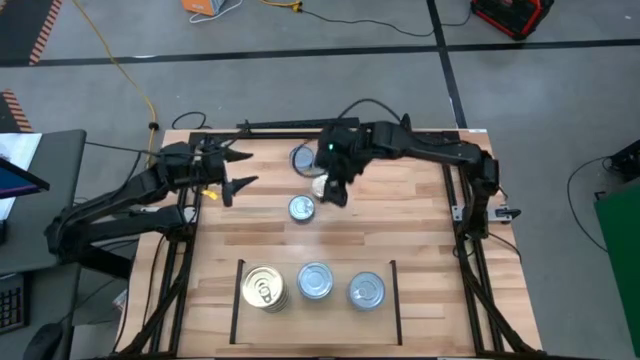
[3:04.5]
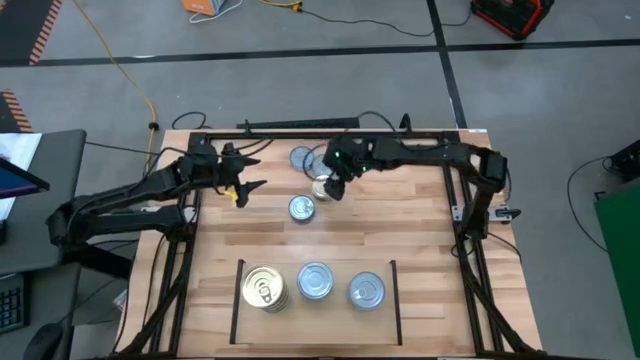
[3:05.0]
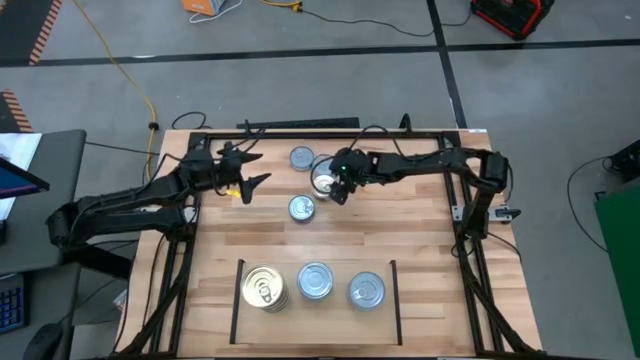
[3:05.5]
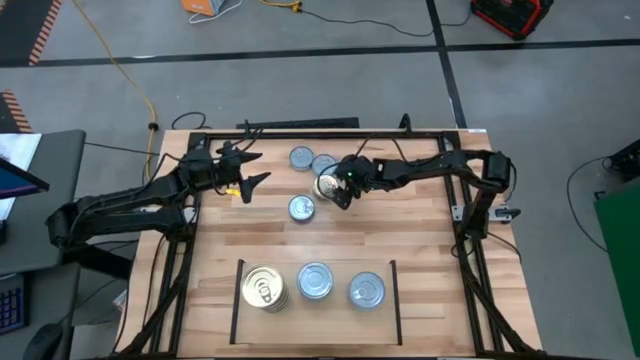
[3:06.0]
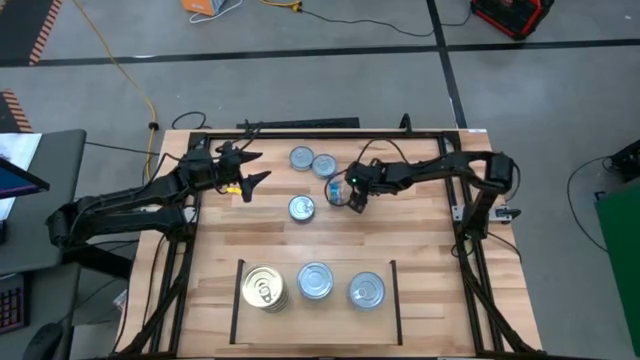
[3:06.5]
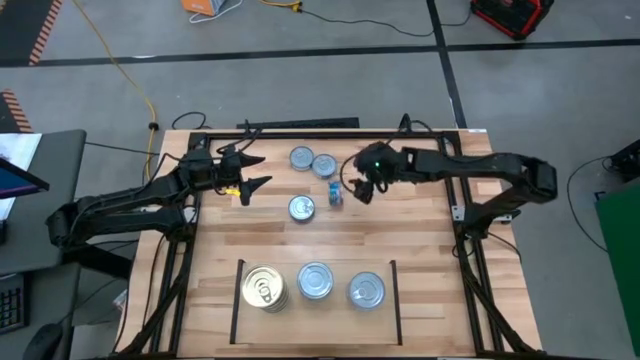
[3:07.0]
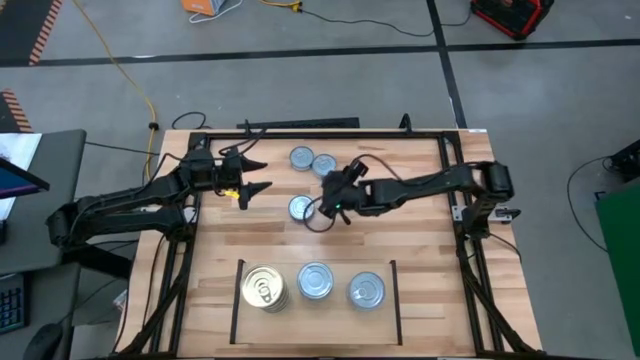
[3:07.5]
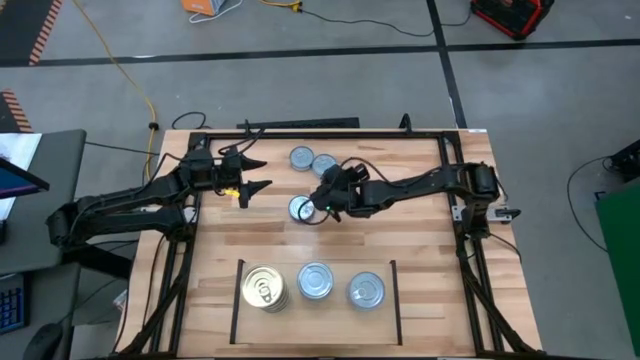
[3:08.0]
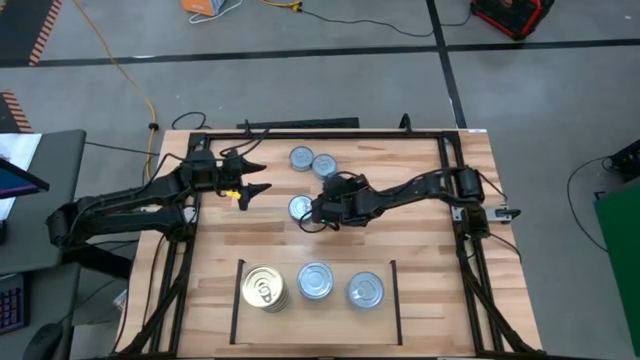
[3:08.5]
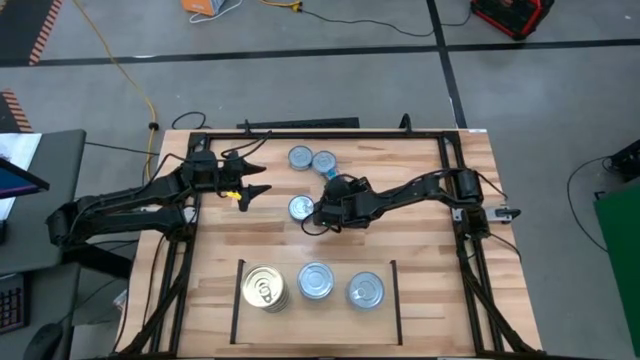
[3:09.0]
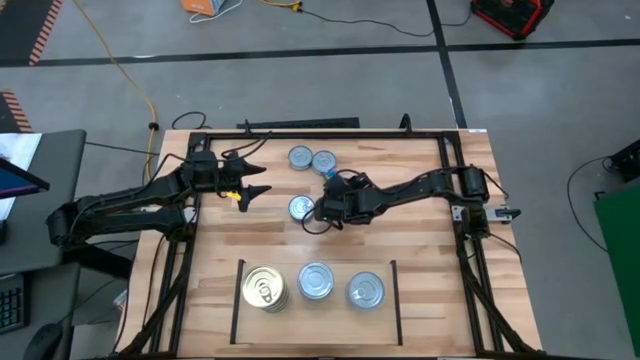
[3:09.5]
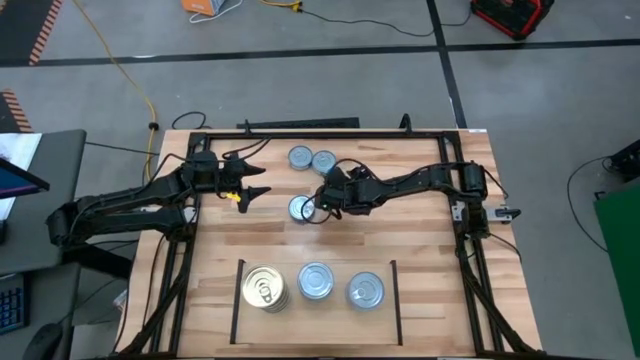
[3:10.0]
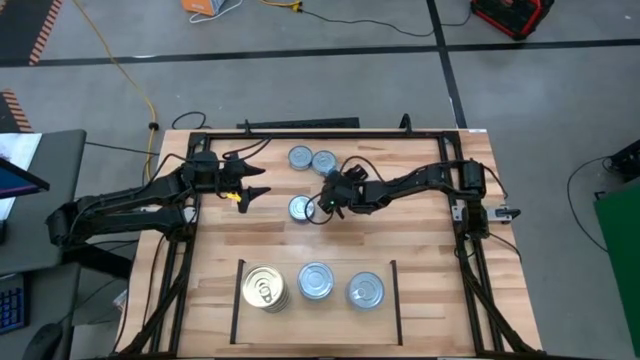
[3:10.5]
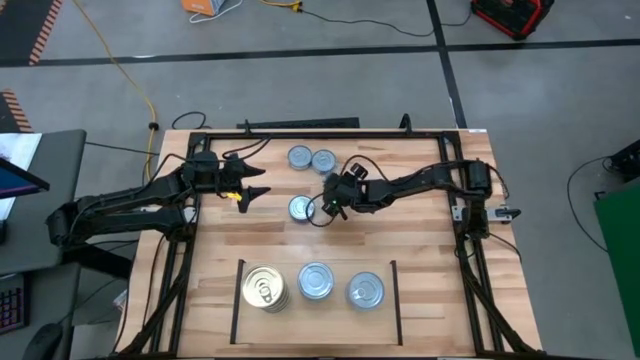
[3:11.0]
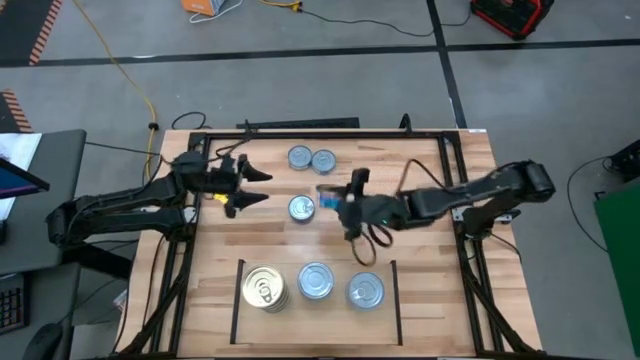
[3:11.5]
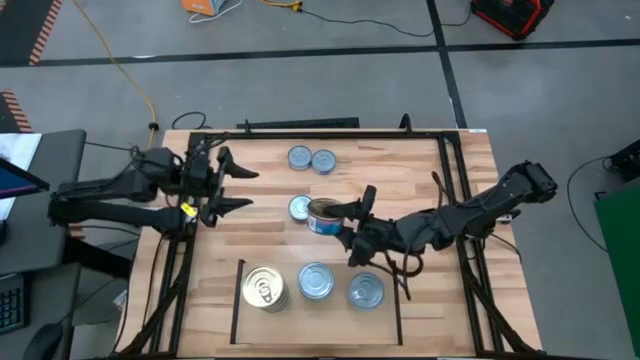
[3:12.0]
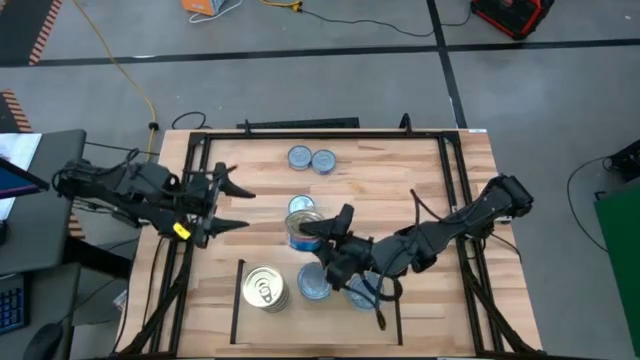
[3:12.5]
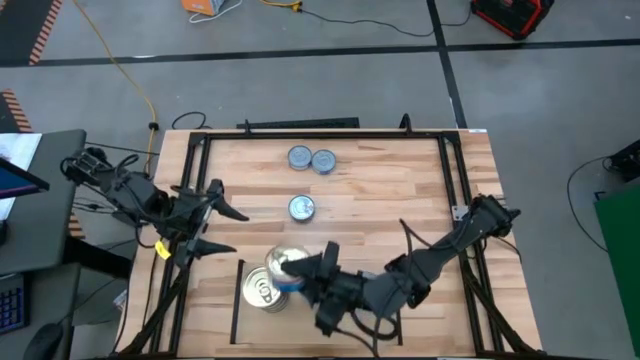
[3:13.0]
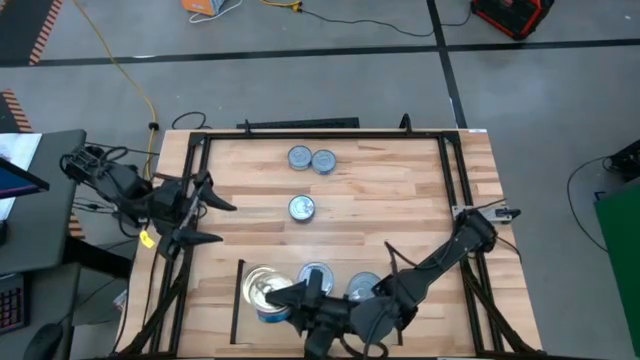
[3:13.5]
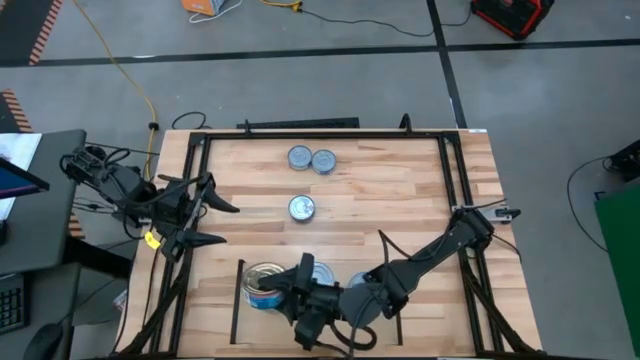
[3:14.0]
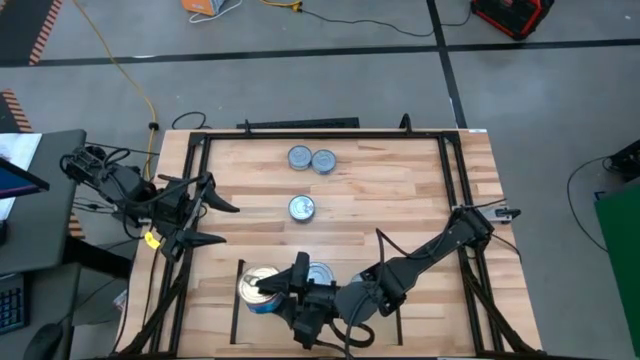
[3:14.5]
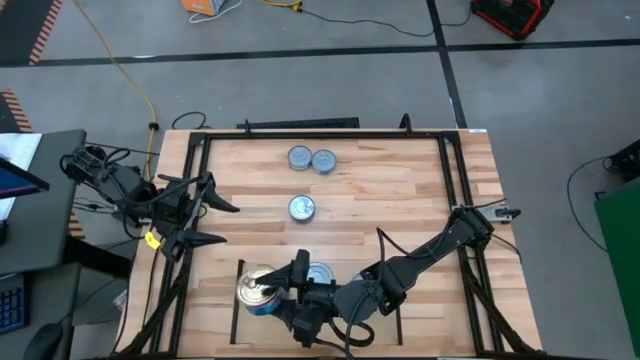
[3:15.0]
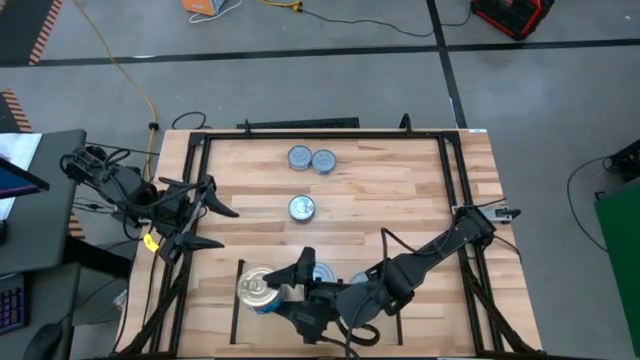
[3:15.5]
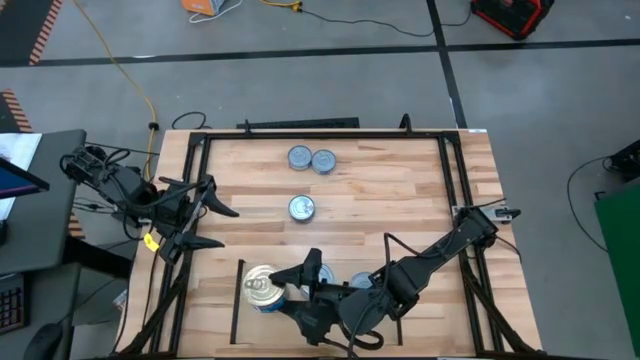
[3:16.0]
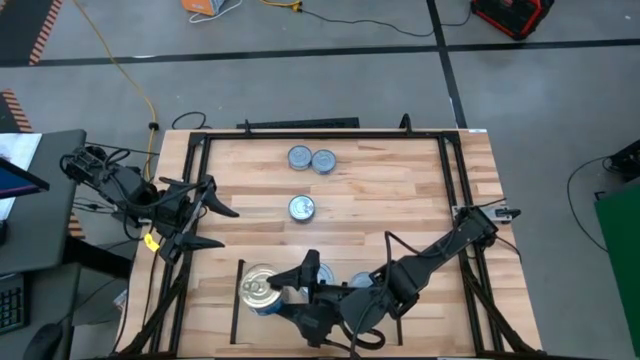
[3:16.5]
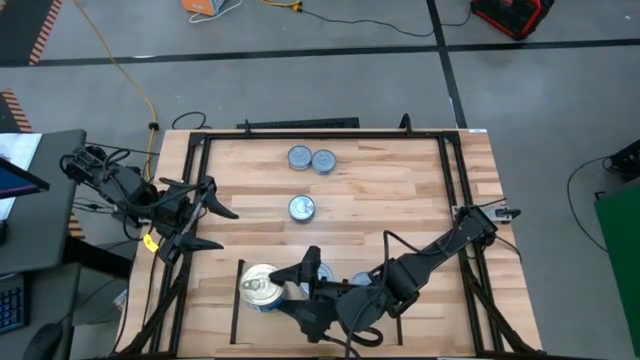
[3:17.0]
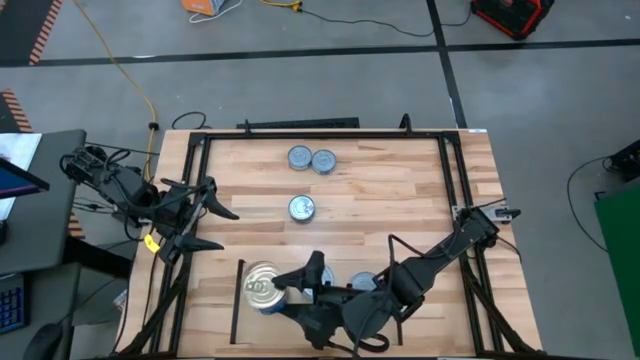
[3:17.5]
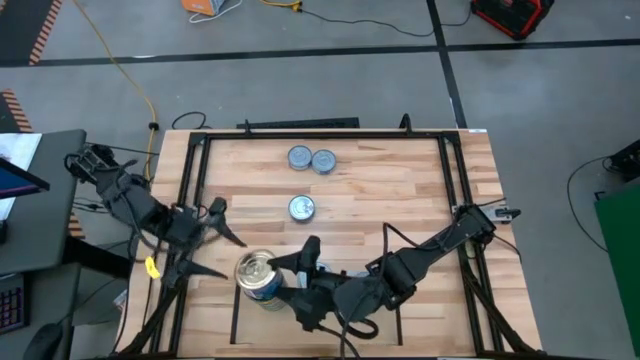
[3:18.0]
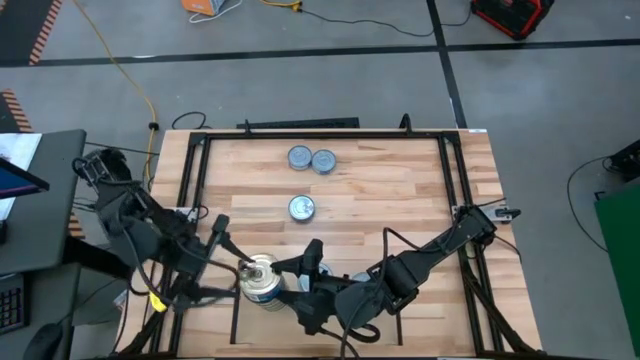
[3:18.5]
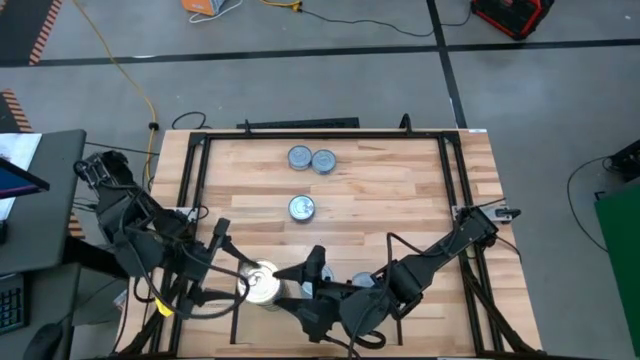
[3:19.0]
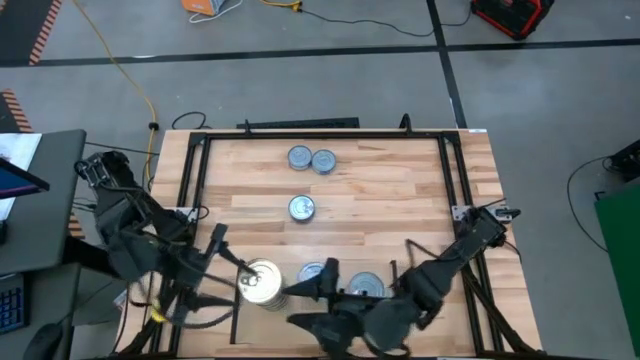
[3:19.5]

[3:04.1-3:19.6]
Task: Stack canned seafood by type on shelf
Put the blue and pink tuna can on the top of the left stacked tuna cans on the shelf

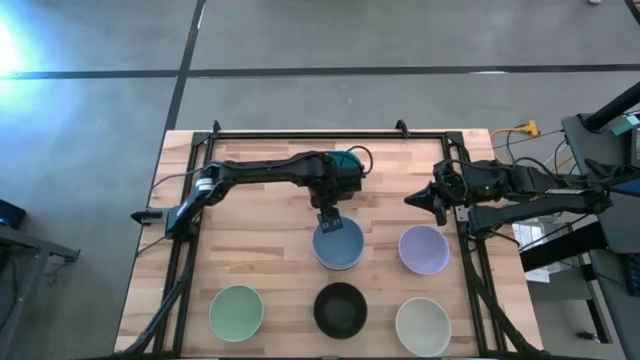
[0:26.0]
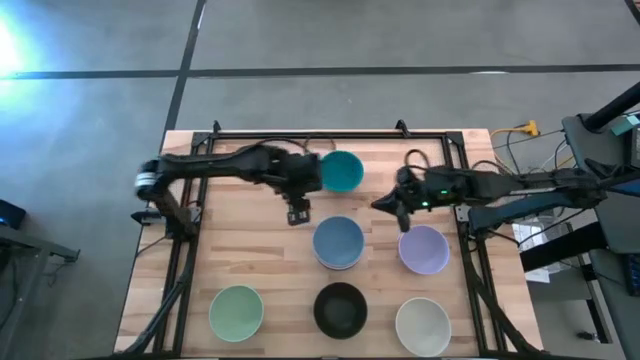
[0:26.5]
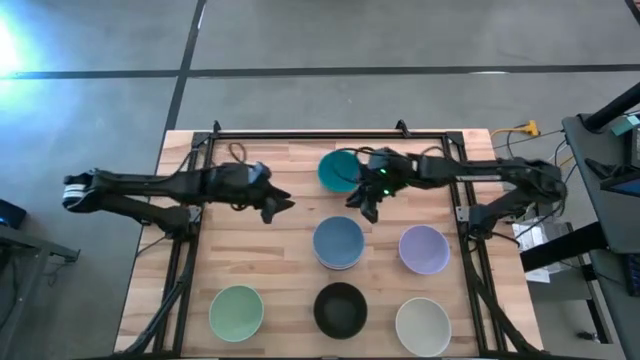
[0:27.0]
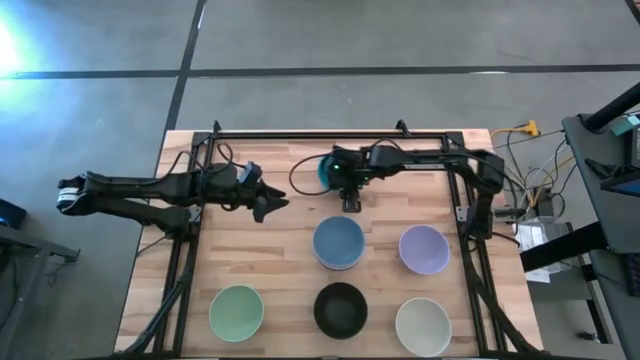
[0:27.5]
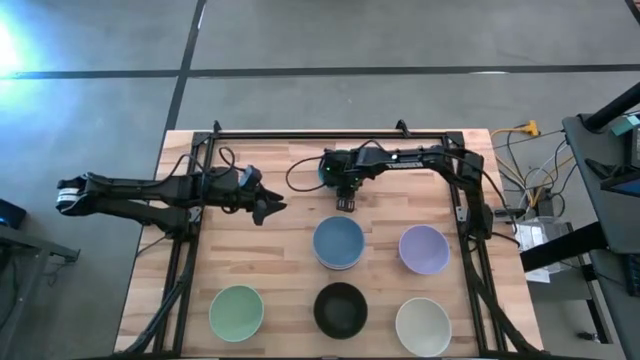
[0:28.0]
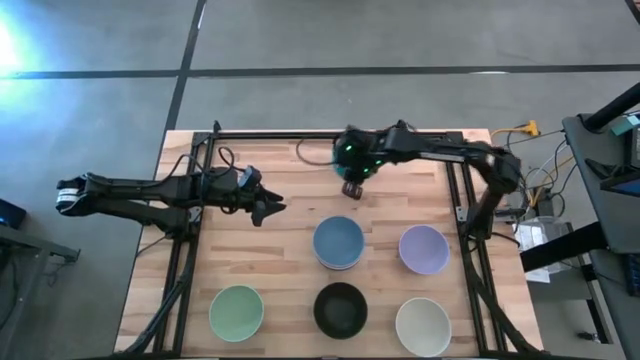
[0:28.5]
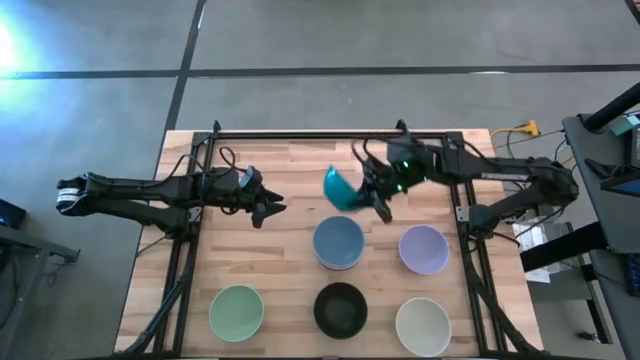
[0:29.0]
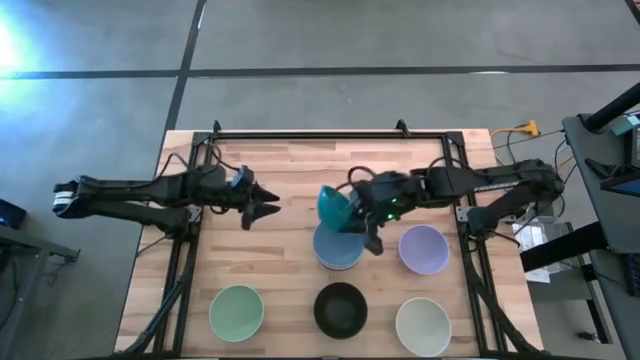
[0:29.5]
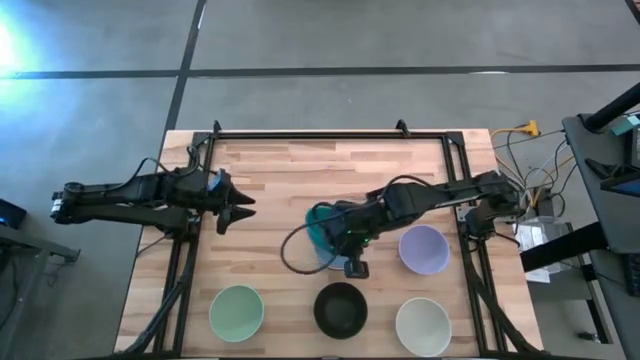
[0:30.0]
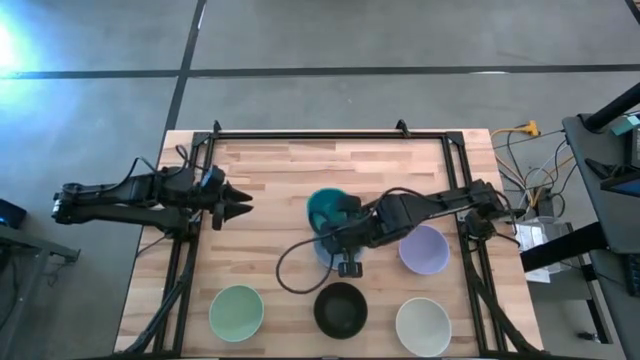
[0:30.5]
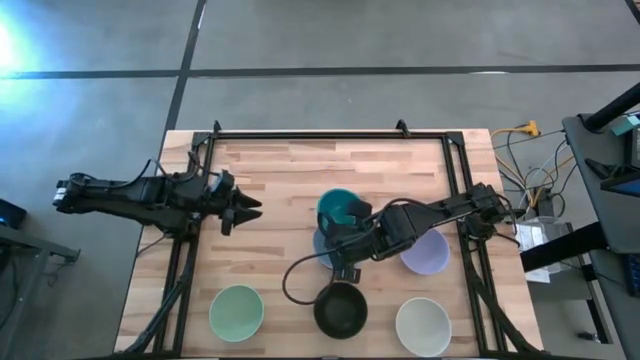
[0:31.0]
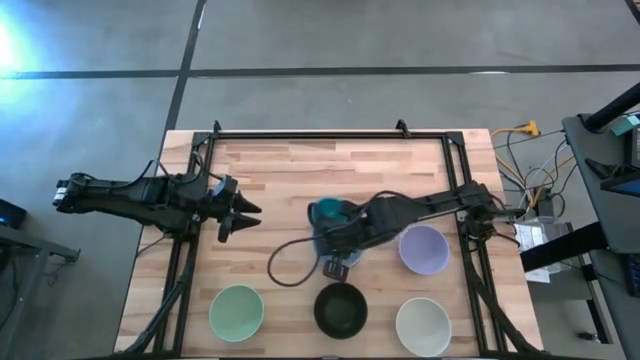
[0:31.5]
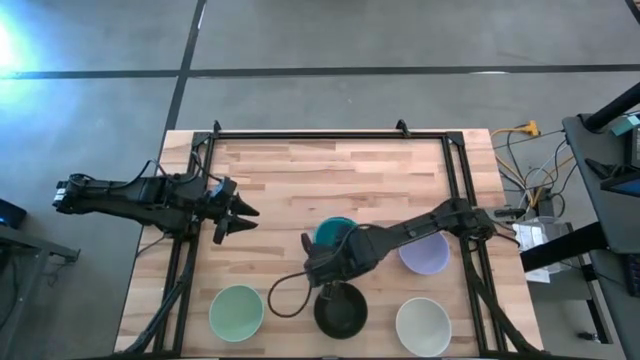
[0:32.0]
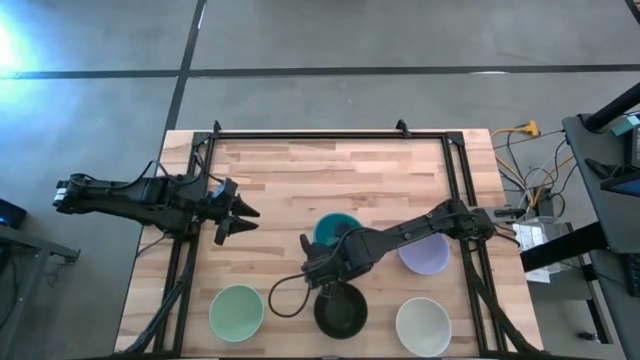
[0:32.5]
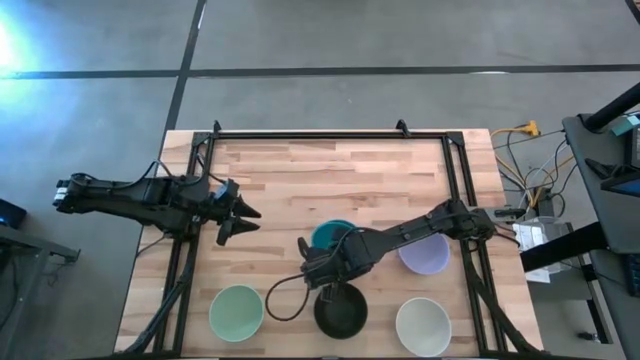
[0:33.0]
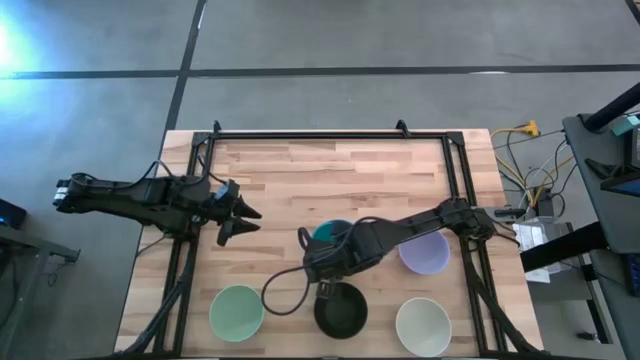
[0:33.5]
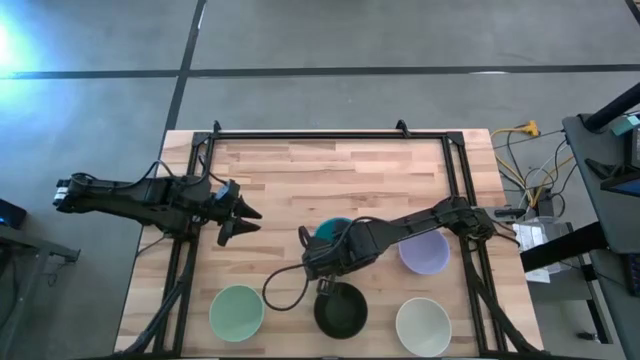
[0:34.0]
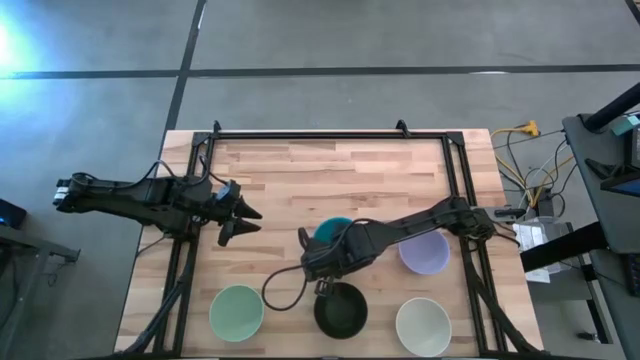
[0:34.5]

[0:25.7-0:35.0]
Task: Nest bowls inside each other
Stack the dark green bowl on the blue bowl
